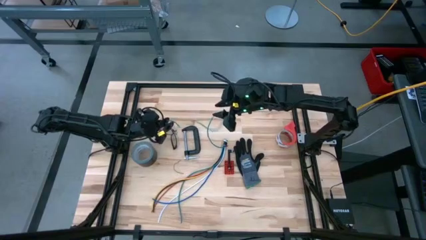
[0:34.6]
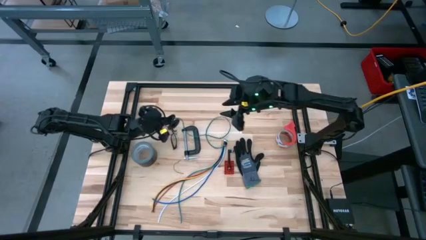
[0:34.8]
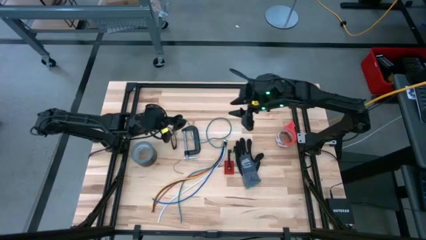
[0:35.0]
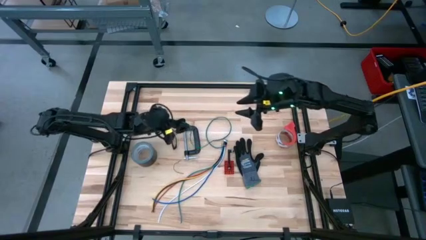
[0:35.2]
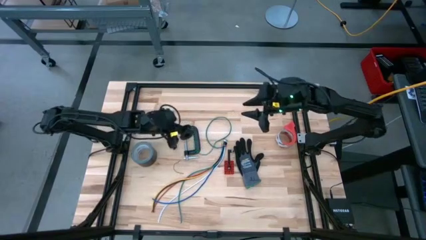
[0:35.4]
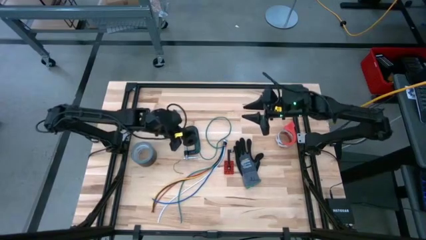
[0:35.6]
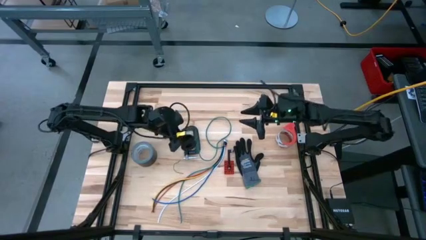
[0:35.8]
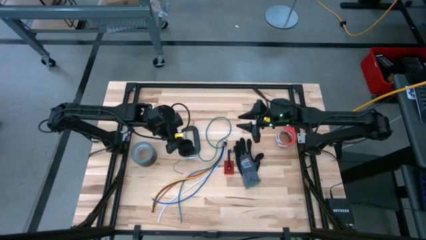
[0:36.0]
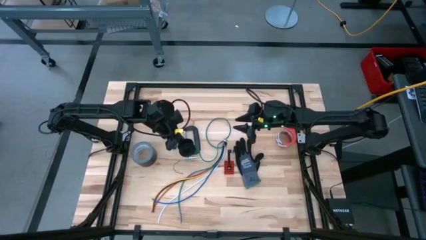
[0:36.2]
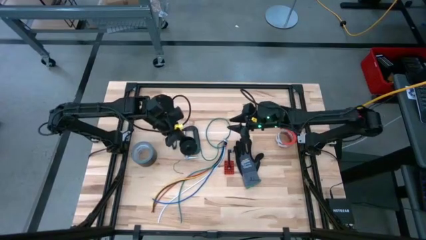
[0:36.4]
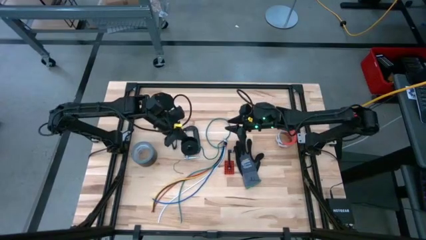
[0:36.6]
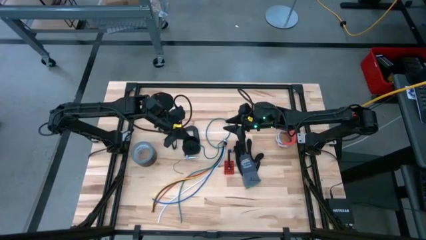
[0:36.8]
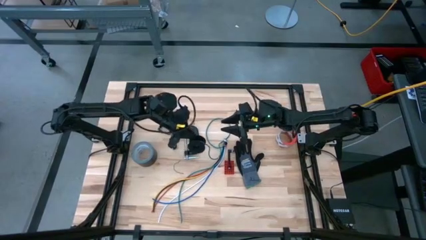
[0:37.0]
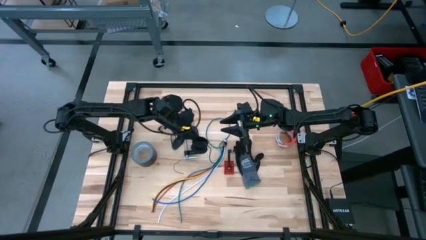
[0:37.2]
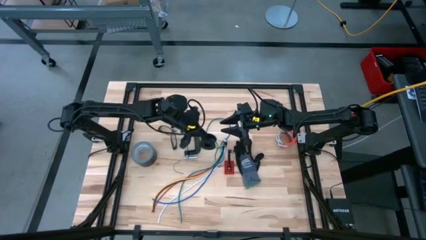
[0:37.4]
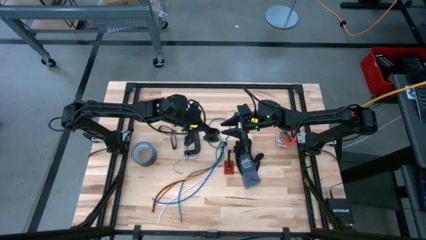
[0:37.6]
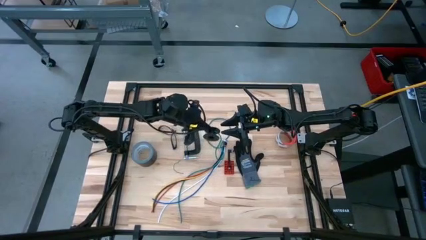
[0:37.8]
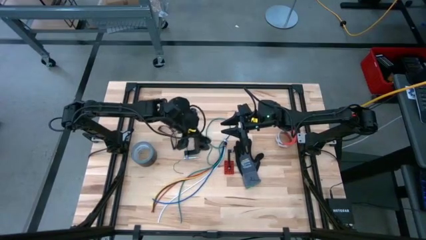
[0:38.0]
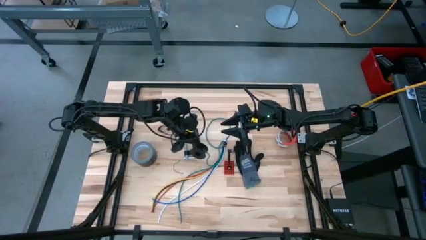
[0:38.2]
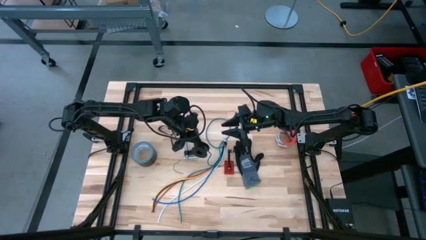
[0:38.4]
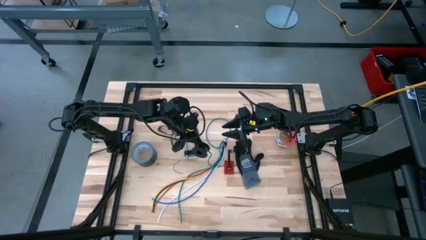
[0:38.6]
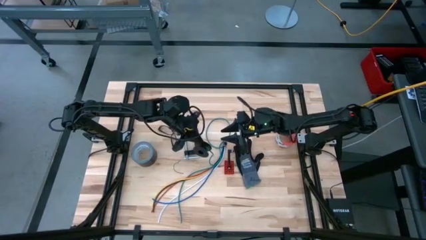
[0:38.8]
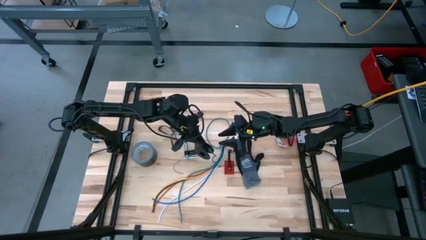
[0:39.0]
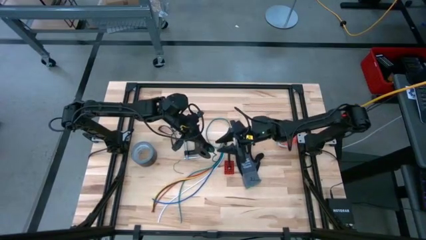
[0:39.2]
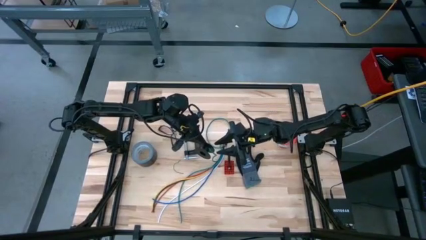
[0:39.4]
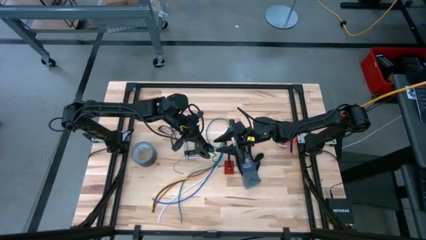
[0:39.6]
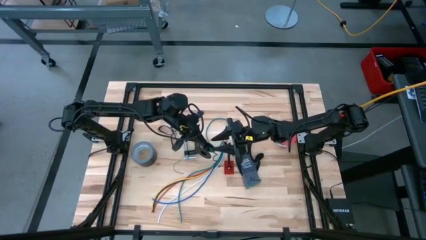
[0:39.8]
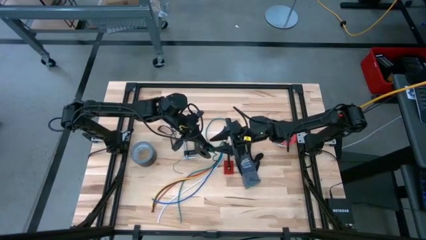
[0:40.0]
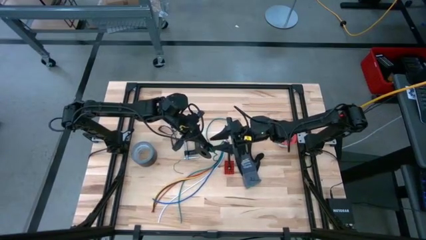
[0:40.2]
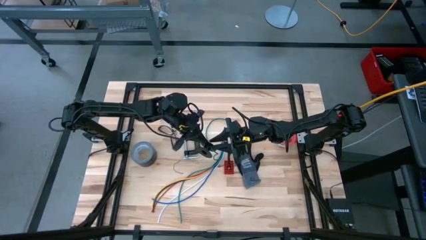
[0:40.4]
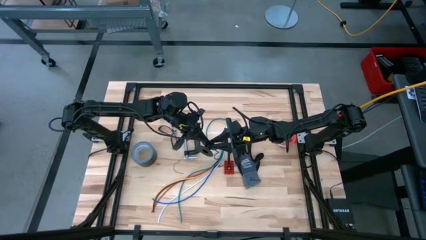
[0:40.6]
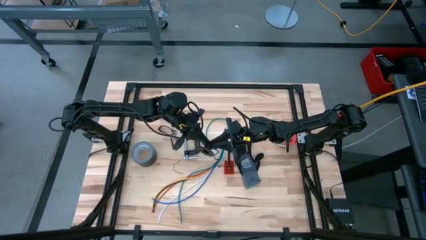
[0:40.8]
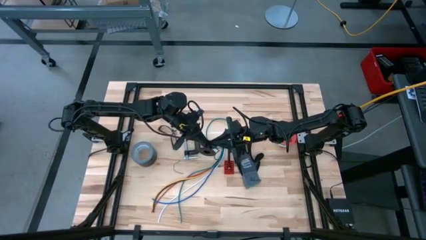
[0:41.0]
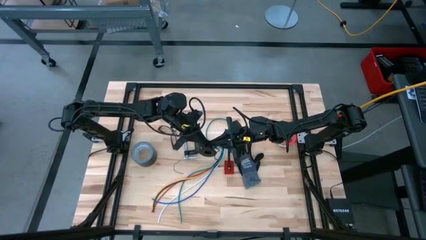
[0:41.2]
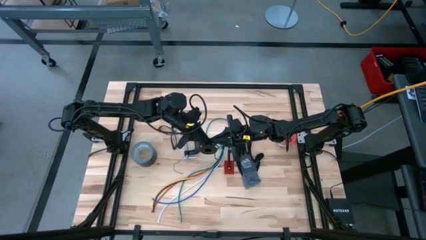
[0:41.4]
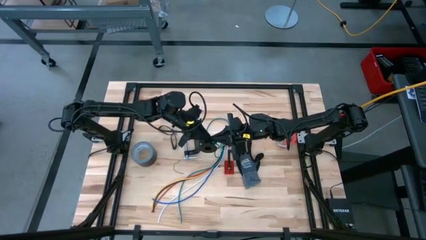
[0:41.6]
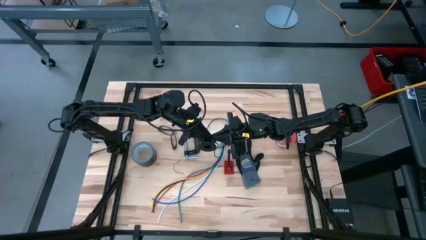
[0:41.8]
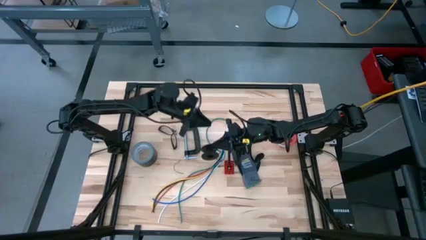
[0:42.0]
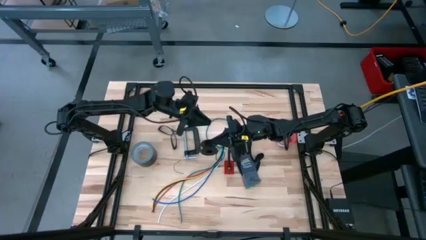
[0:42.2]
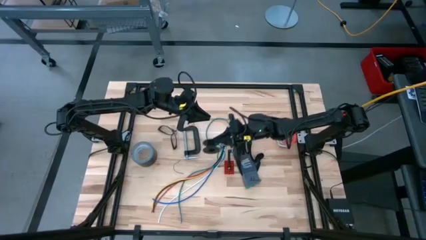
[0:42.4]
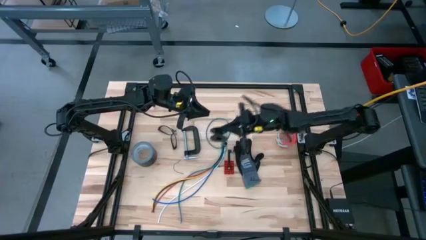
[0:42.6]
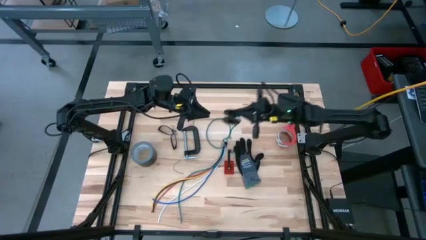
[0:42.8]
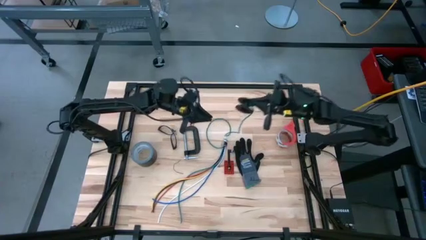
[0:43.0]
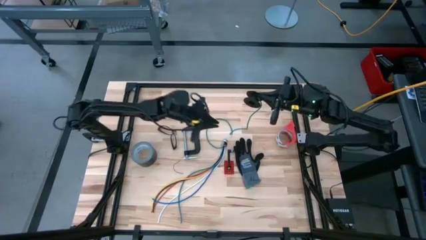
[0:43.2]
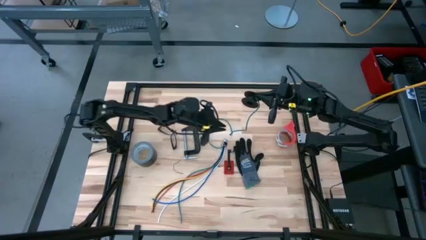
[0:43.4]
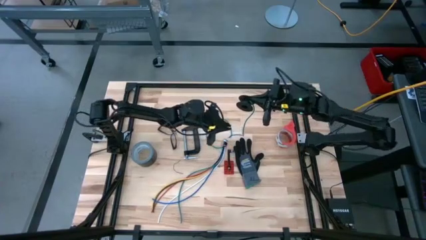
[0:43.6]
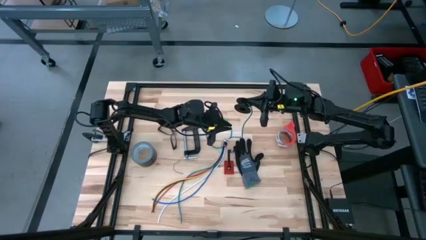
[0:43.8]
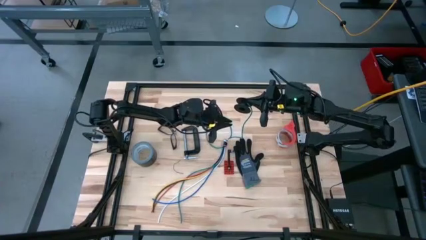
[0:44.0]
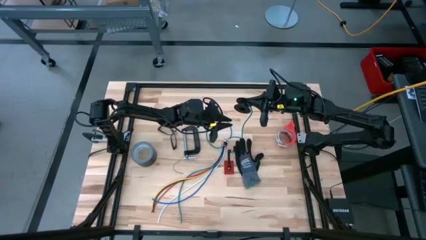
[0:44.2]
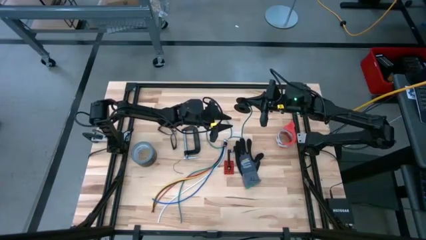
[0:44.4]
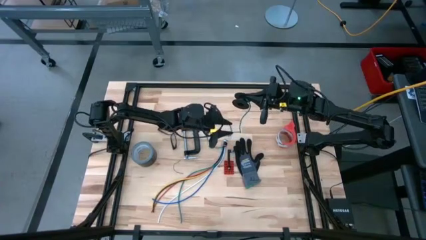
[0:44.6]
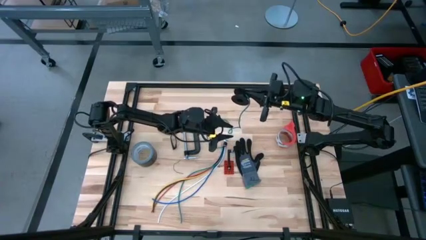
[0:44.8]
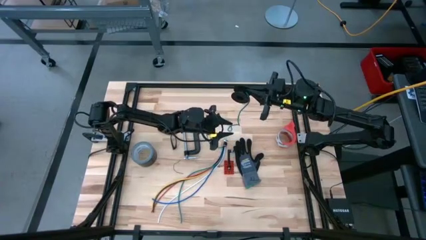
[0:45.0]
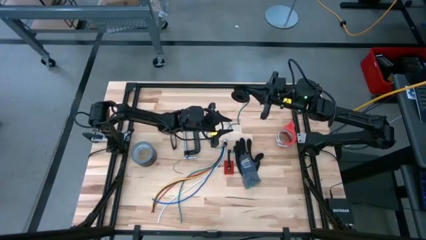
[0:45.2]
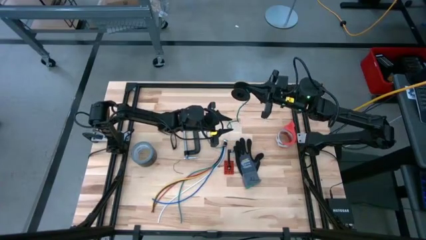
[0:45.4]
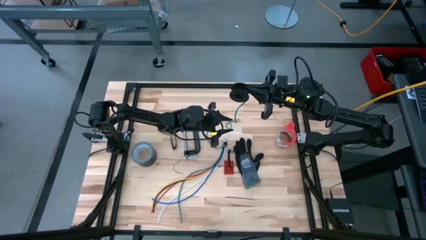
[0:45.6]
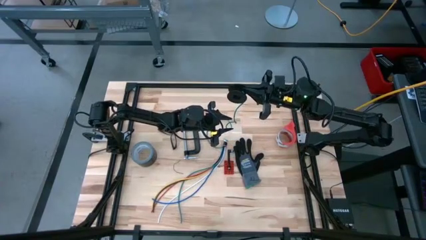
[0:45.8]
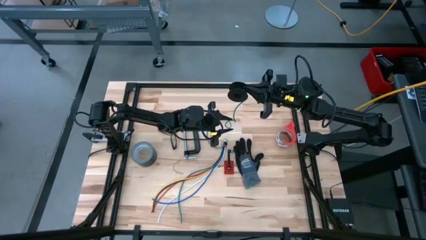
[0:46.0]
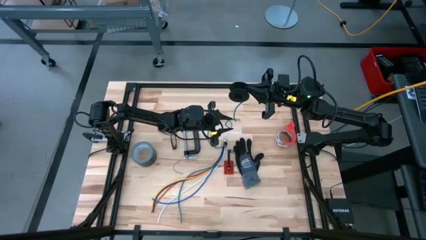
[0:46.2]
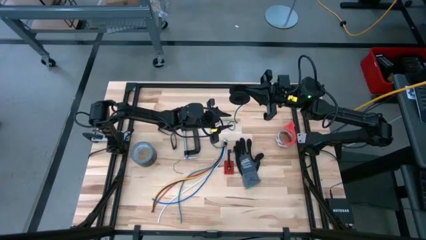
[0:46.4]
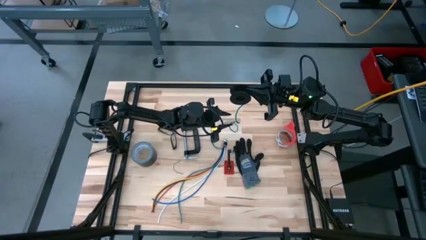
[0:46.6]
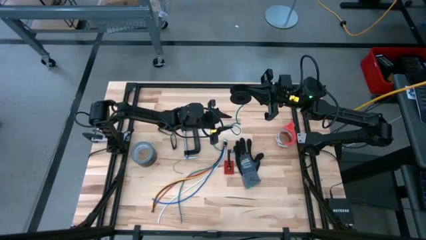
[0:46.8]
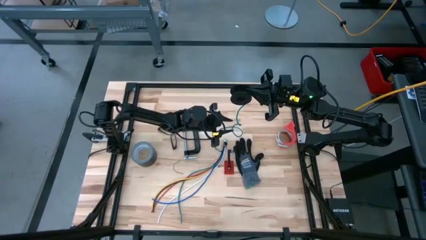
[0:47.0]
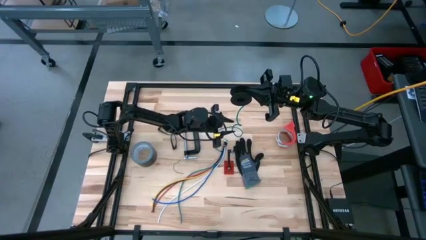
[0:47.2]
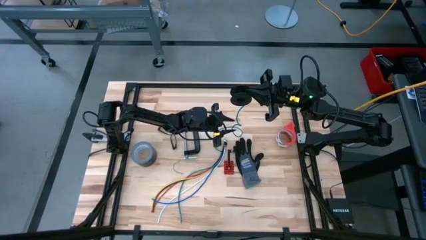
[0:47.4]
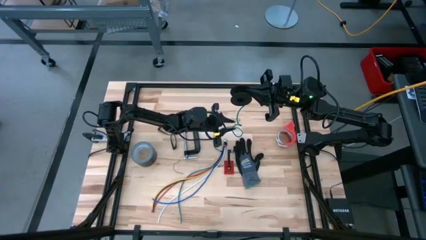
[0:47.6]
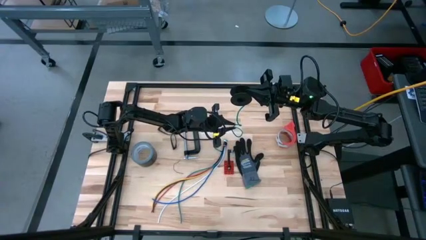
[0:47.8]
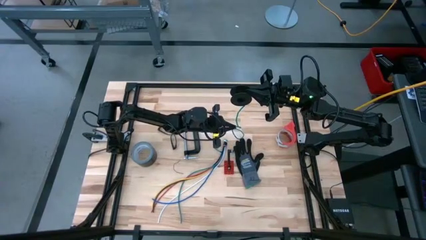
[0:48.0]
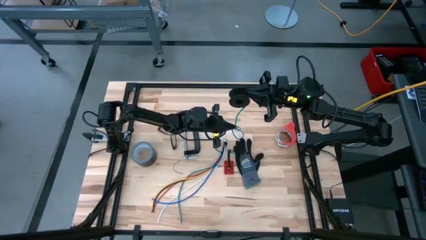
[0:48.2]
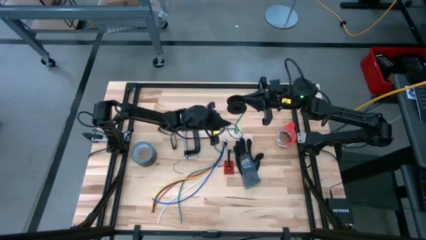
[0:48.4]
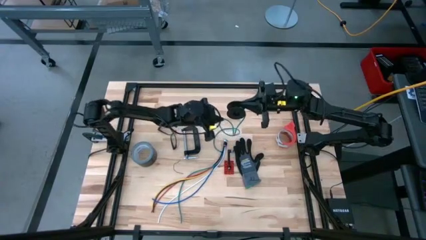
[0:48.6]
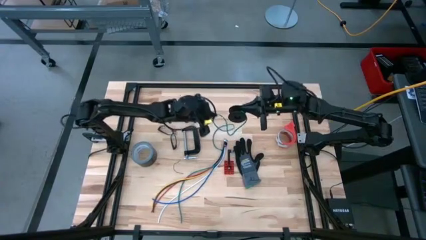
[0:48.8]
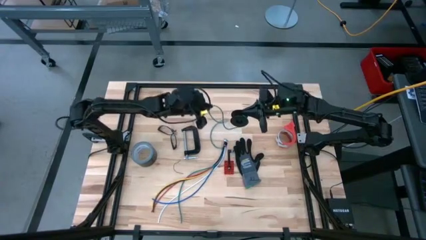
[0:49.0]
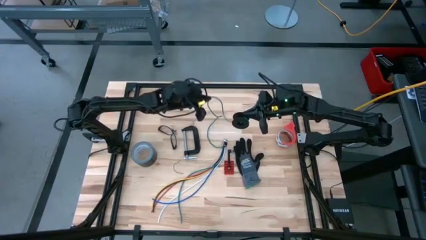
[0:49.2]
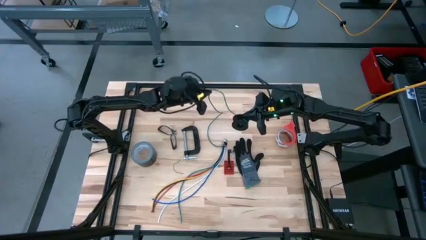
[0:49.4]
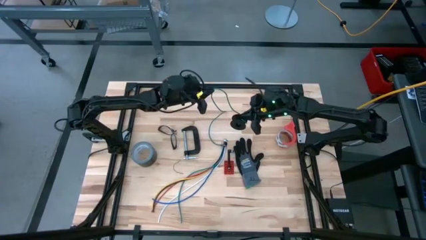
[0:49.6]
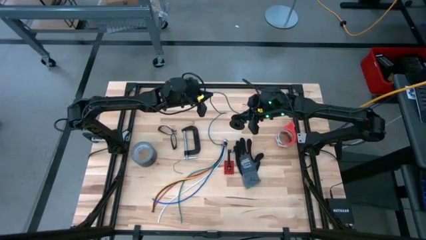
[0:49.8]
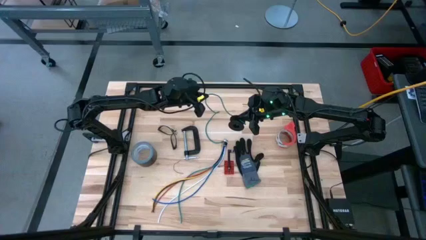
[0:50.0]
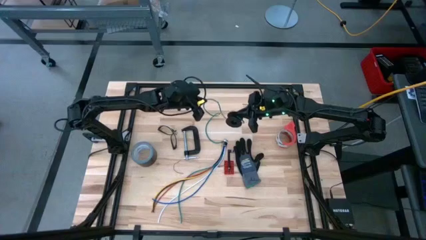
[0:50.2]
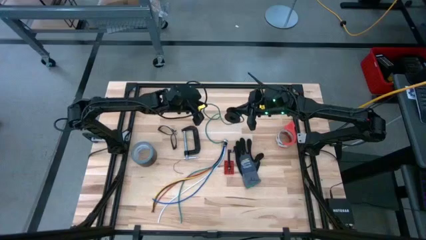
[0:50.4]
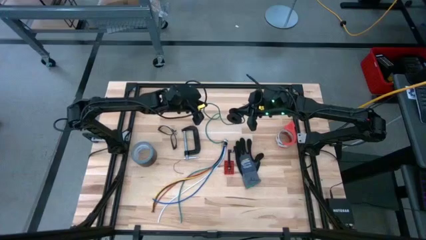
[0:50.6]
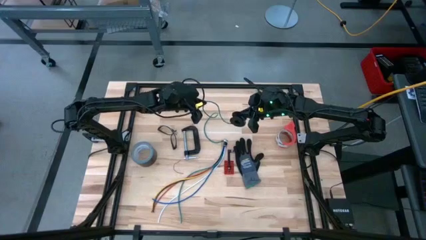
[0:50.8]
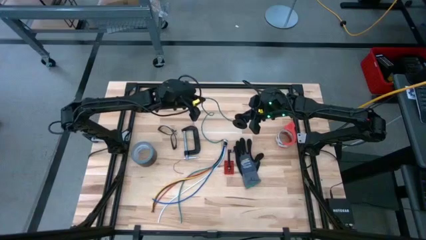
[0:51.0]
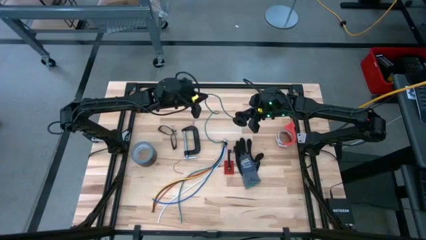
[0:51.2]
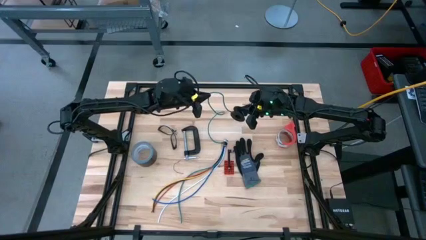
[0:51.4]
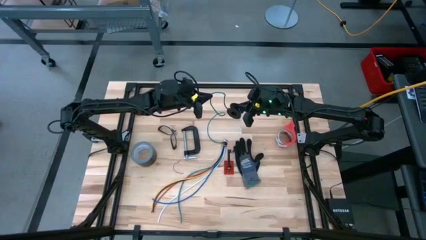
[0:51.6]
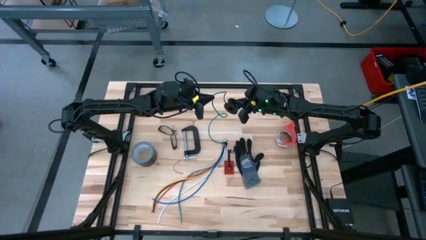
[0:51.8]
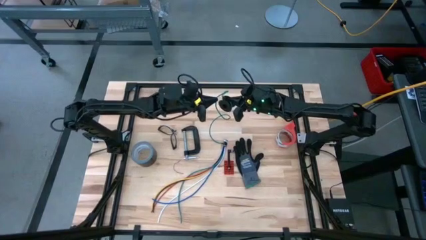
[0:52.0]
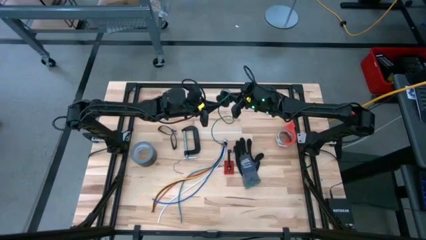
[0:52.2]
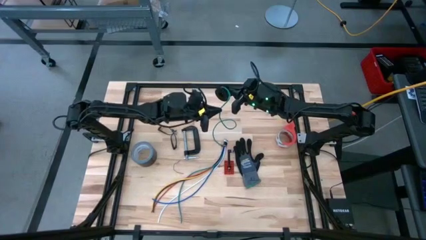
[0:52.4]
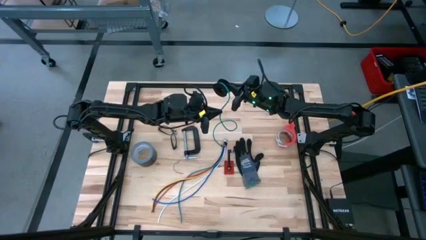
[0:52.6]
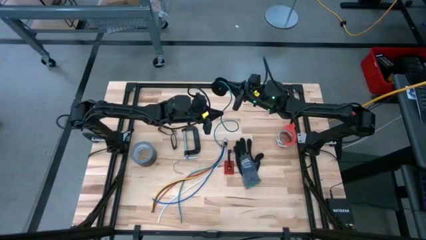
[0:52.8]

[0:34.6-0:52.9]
Task: Coil cords
Coil the green wire on the spool
